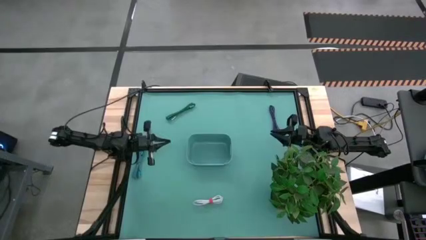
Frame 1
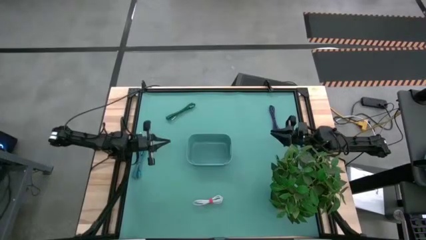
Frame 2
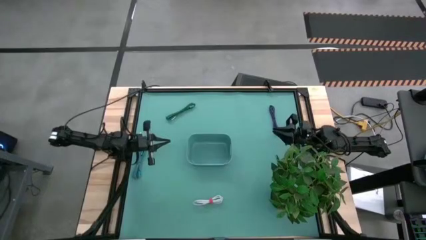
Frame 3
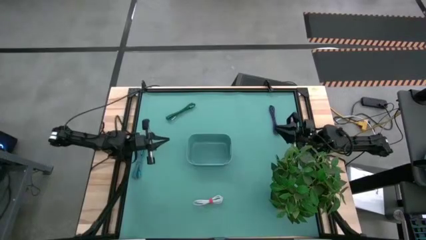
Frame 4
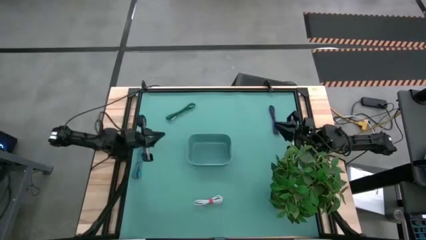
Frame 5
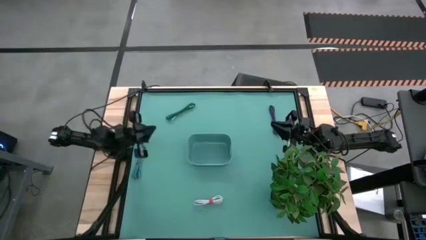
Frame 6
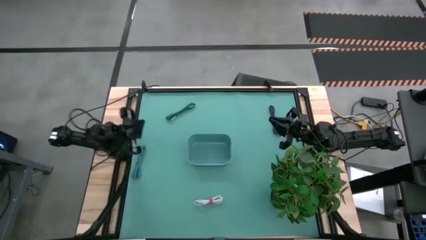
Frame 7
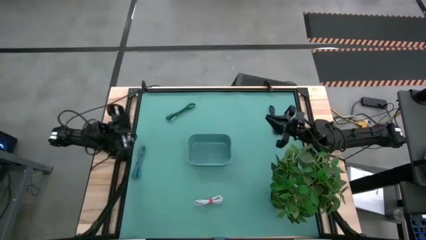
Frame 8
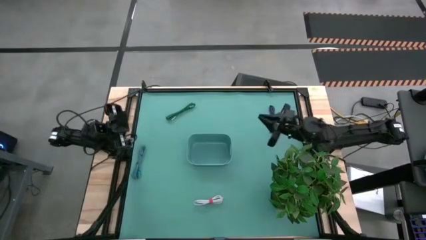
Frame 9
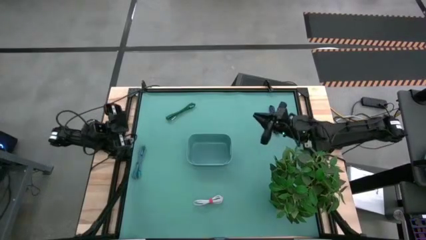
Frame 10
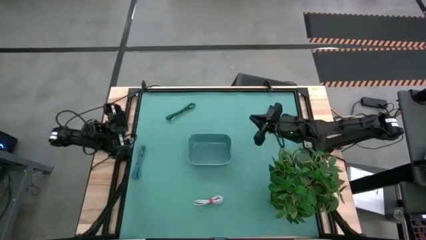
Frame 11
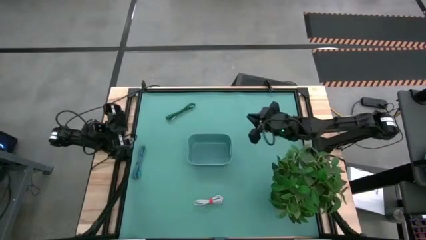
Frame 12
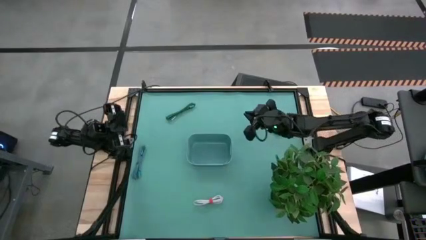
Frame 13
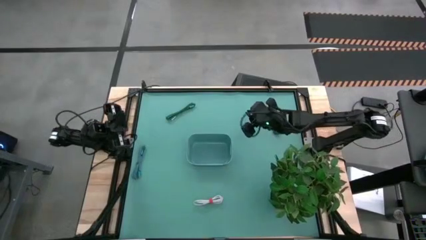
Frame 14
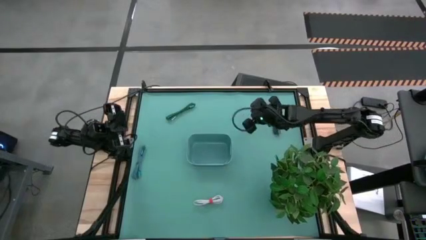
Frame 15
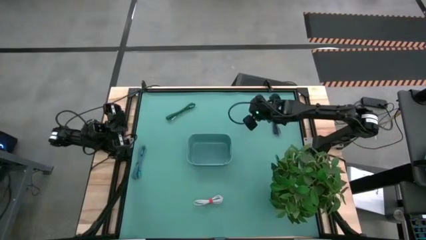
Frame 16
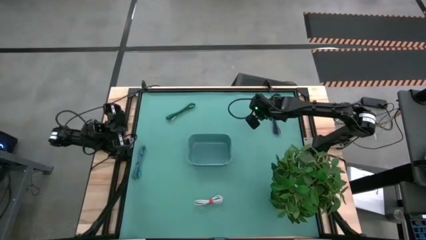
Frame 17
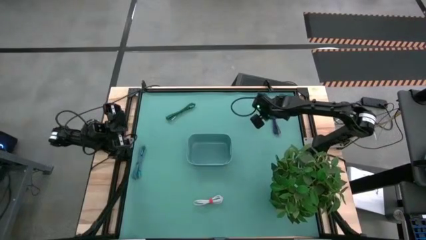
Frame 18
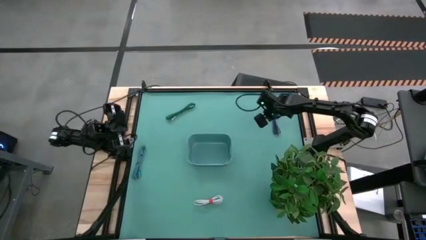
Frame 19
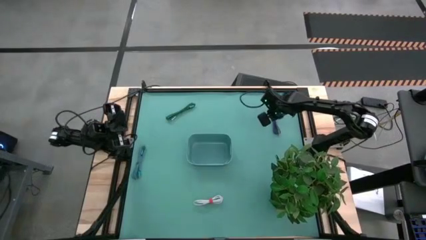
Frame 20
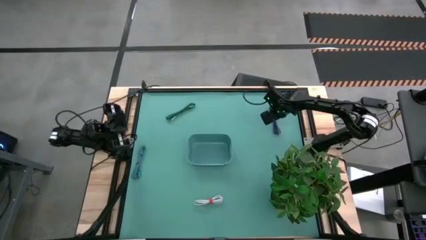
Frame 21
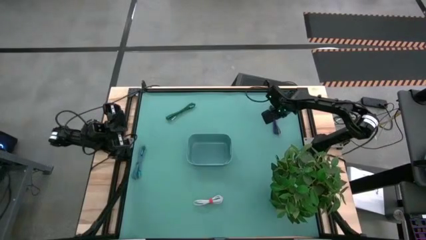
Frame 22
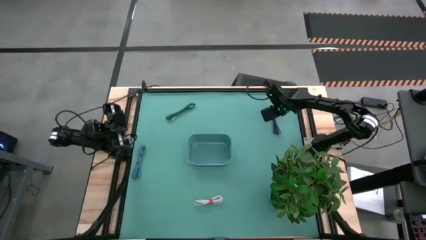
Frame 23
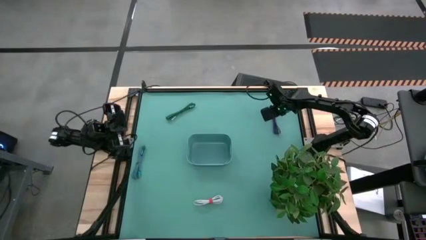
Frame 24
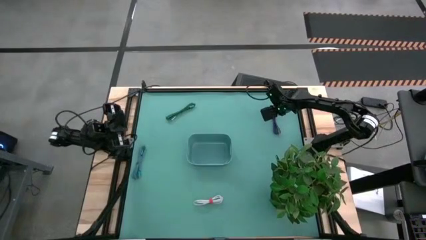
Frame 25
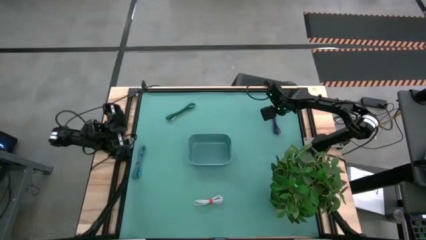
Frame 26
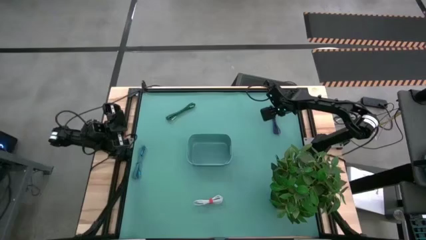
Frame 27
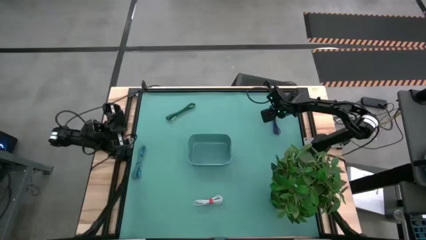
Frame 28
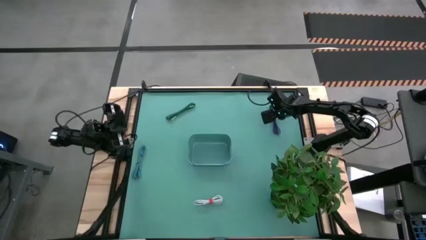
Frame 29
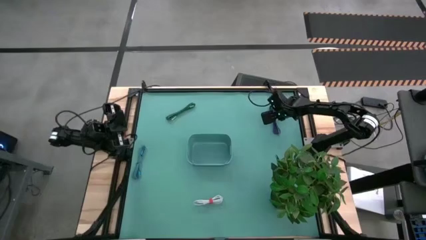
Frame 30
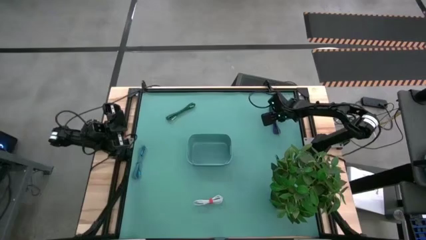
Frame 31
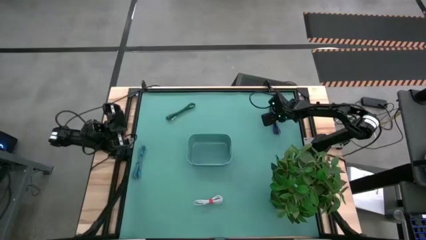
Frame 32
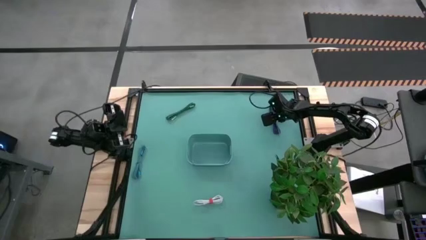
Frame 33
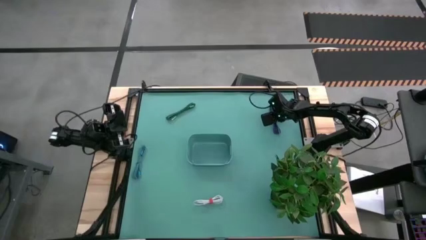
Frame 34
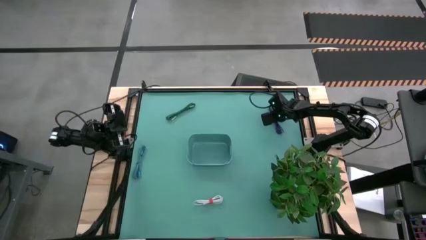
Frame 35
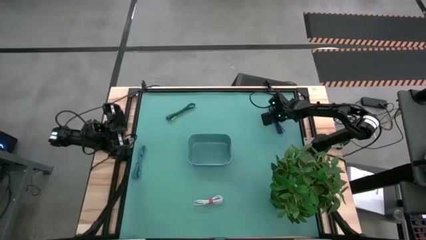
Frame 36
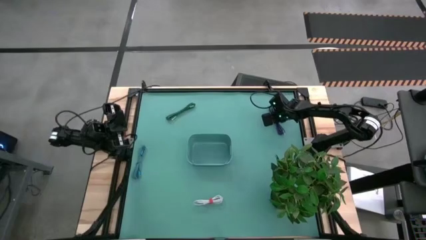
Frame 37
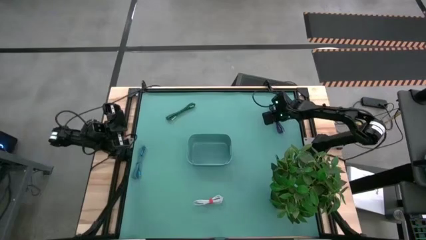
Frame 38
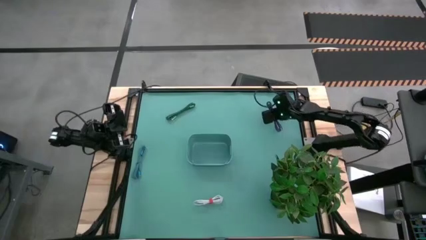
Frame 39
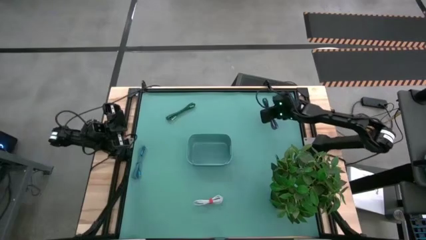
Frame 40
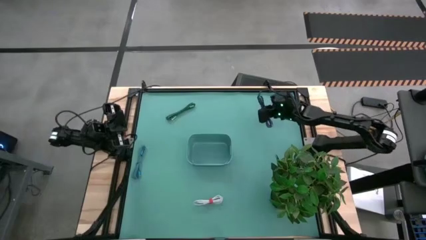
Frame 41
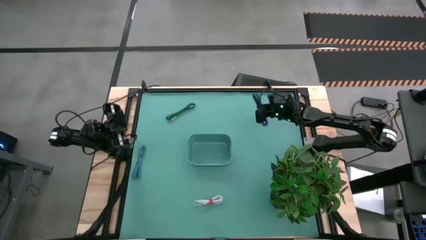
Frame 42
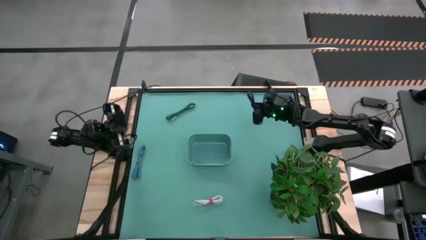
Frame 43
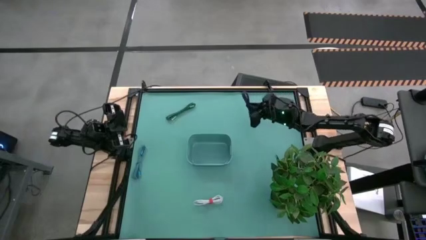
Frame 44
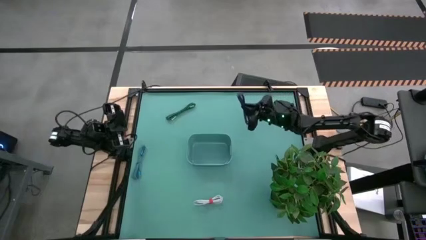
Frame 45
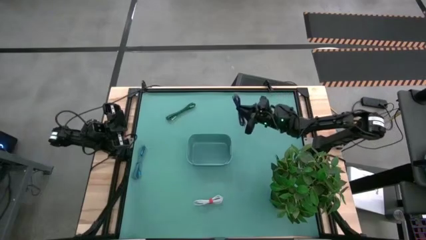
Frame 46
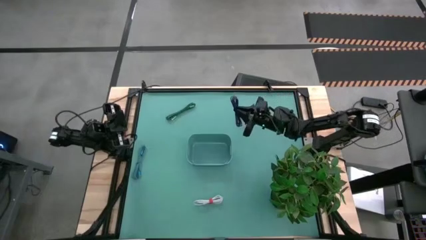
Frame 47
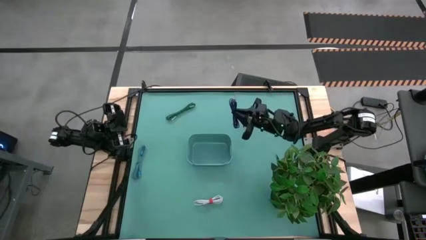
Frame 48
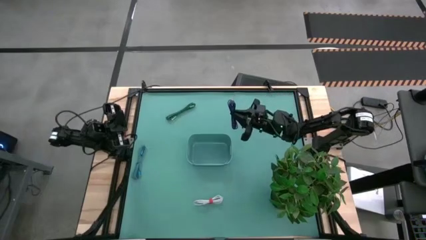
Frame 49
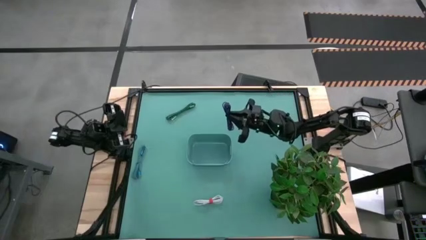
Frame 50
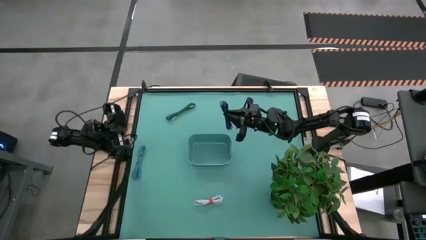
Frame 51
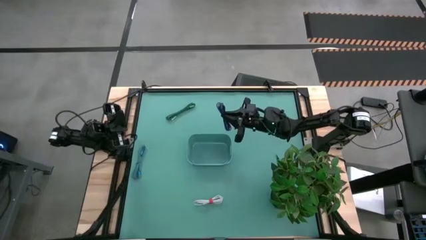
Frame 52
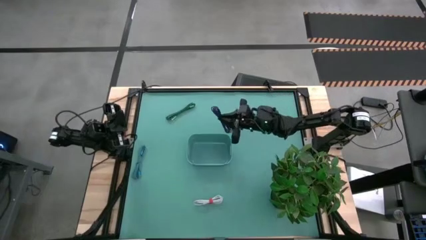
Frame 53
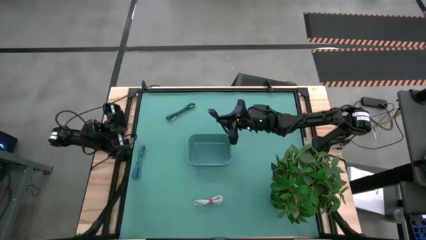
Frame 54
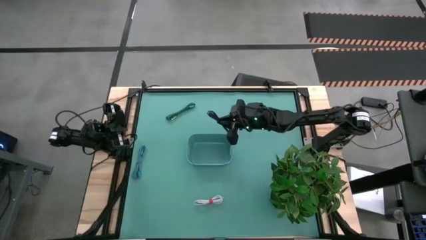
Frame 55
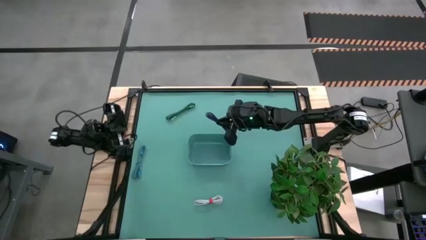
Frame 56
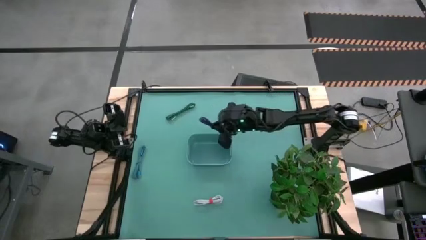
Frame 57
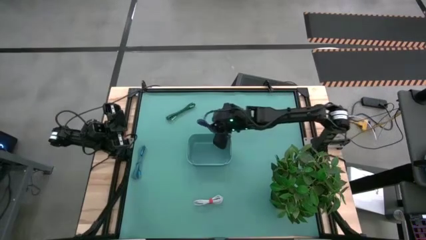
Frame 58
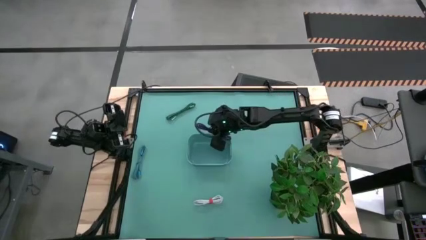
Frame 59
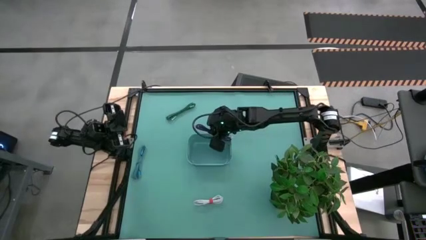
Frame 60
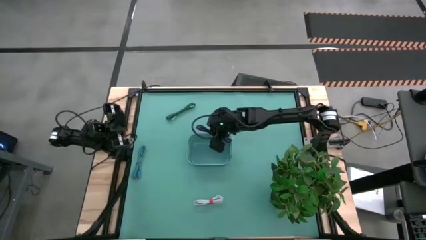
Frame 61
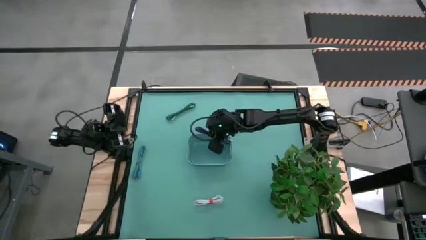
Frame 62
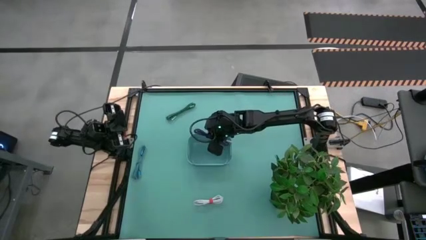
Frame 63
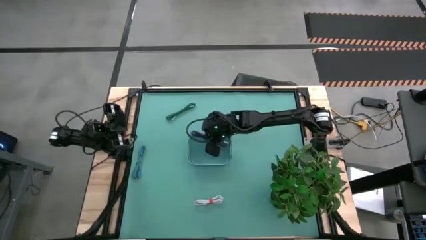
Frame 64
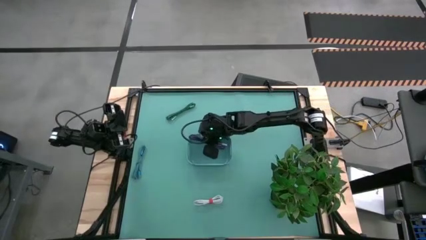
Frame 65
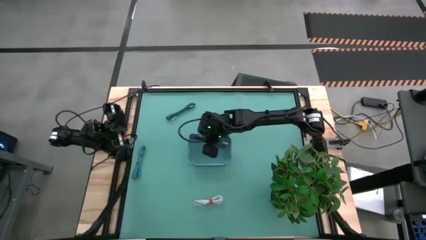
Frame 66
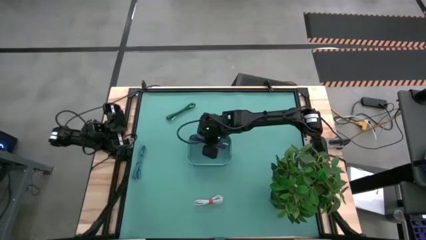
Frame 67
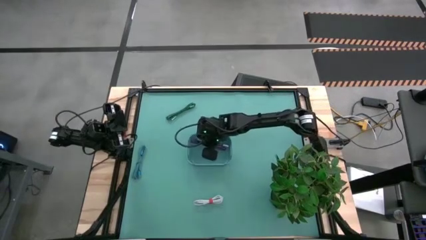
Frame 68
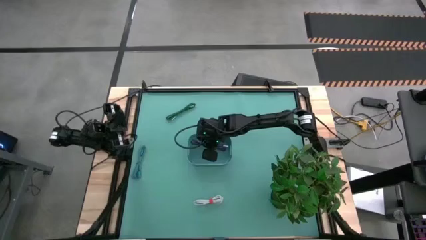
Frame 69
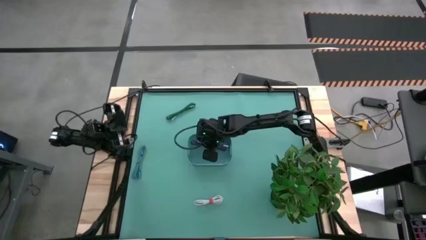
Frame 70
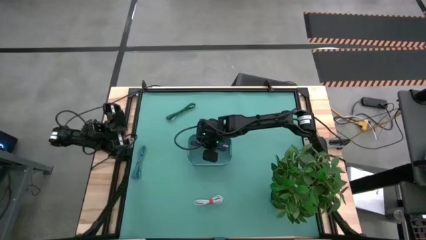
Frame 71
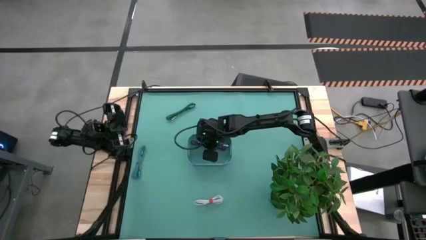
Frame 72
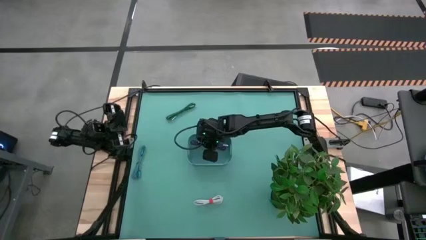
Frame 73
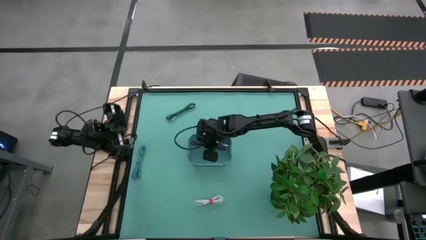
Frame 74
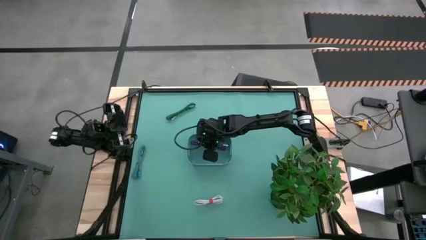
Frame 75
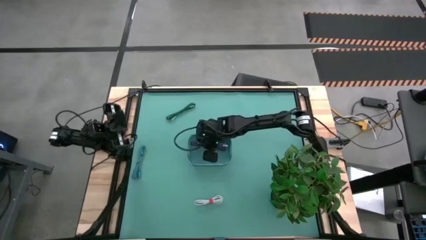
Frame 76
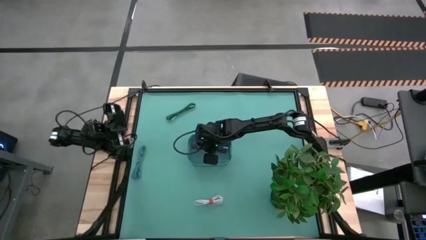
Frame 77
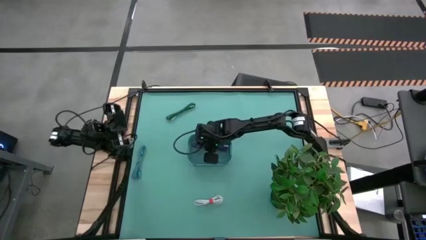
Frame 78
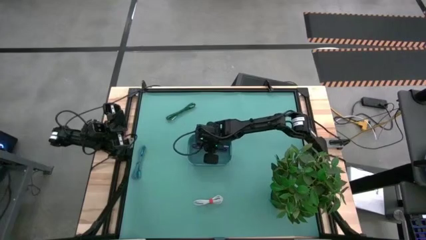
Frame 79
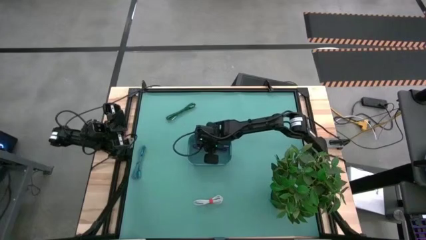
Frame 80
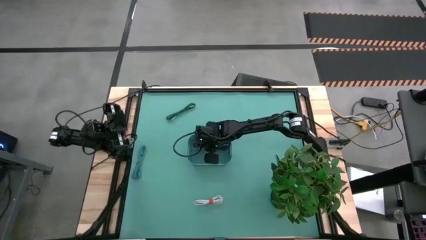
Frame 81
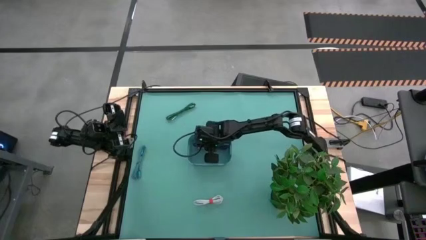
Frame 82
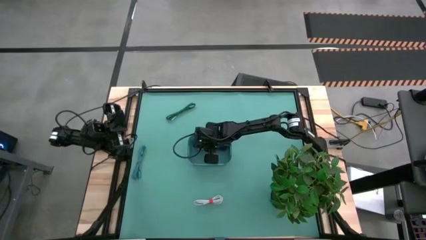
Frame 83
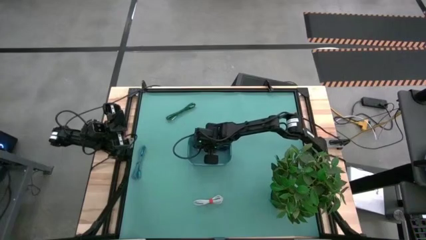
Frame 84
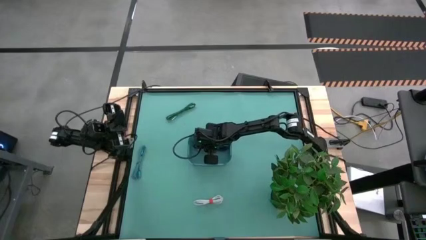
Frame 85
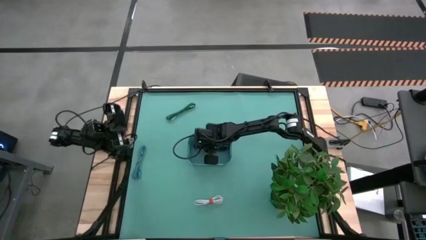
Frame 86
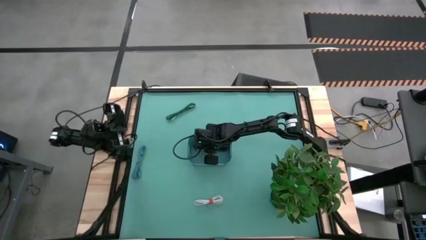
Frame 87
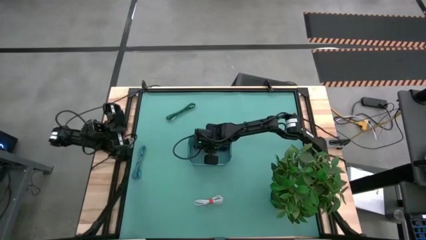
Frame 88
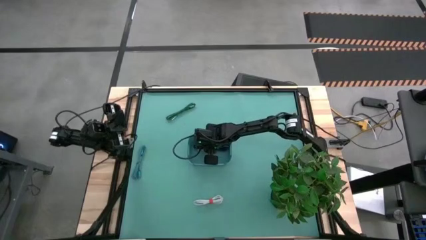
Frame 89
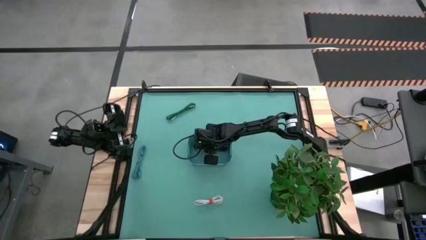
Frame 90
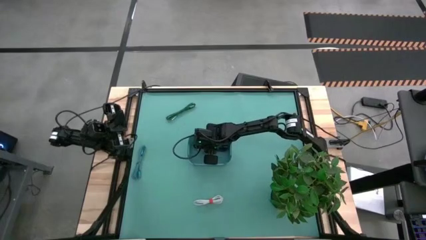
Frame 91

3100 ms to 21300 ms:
Task: Pick and place USB-C Cables
Put the pink charger cable into the green bin
